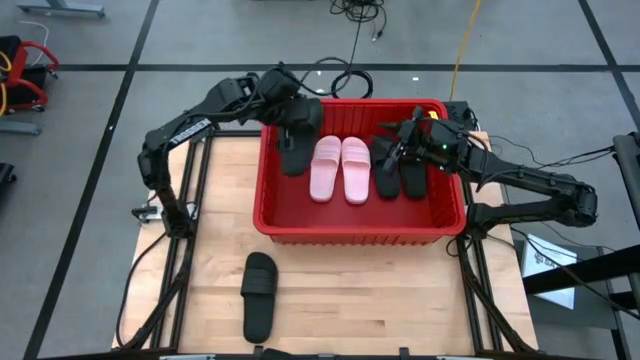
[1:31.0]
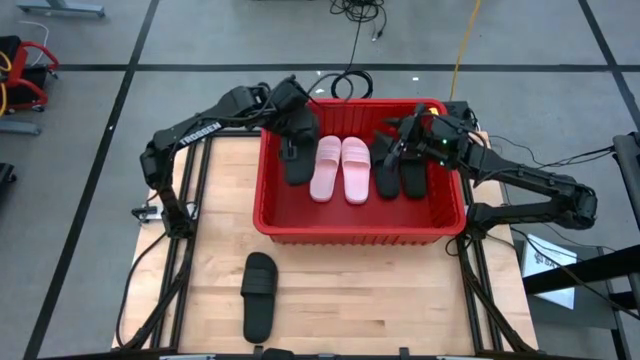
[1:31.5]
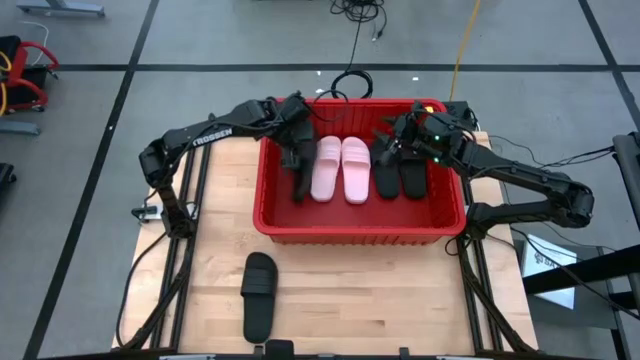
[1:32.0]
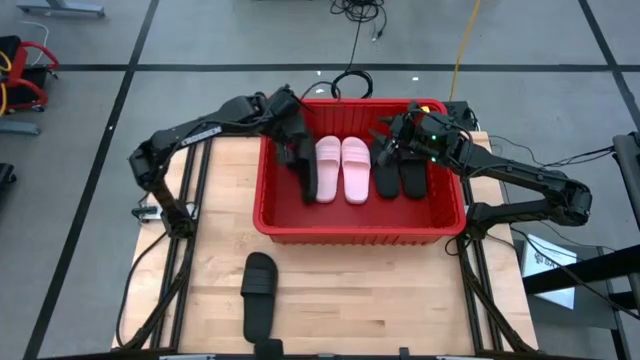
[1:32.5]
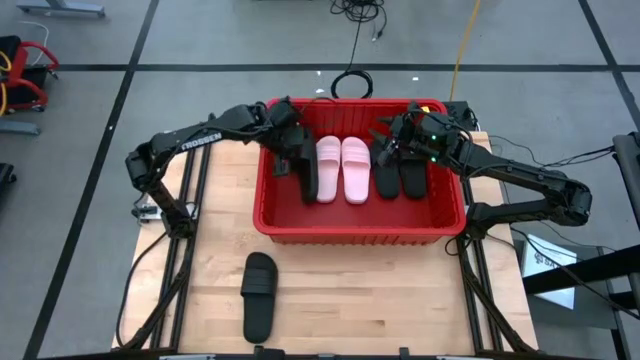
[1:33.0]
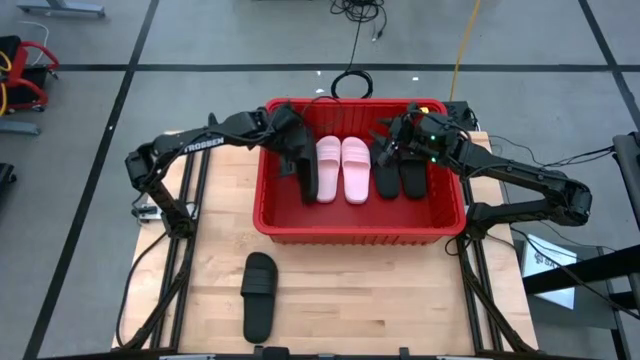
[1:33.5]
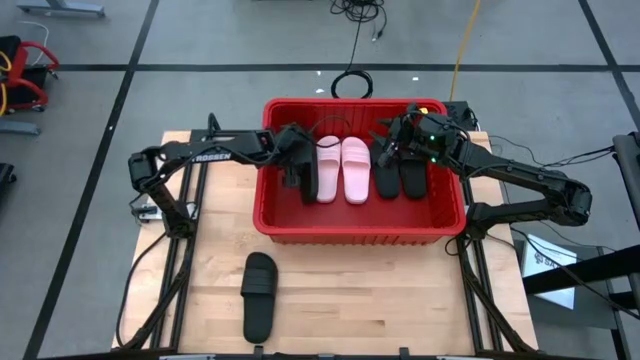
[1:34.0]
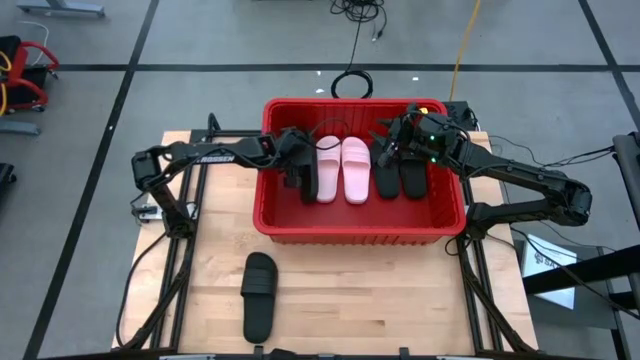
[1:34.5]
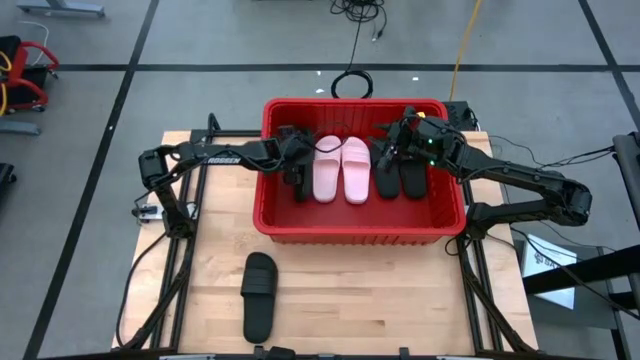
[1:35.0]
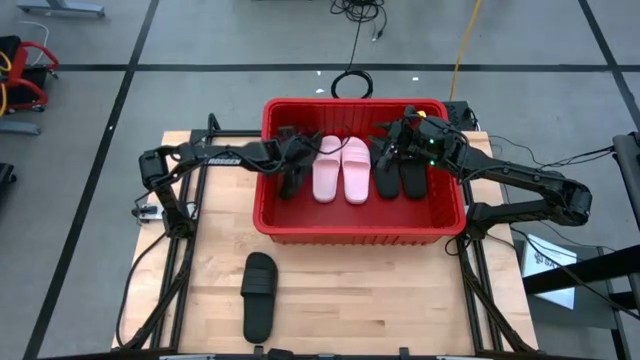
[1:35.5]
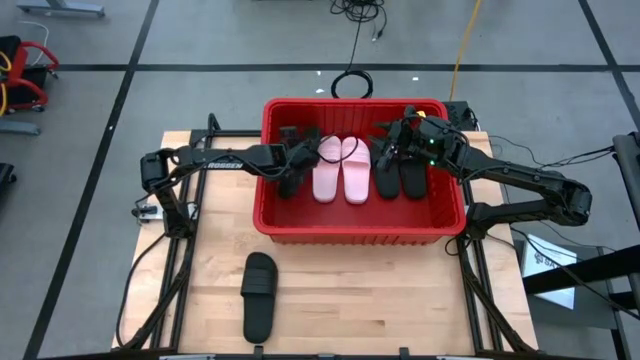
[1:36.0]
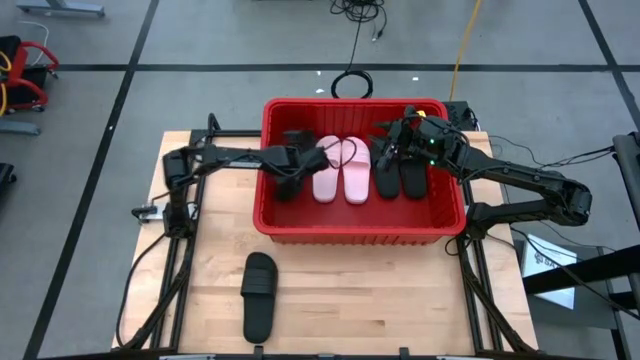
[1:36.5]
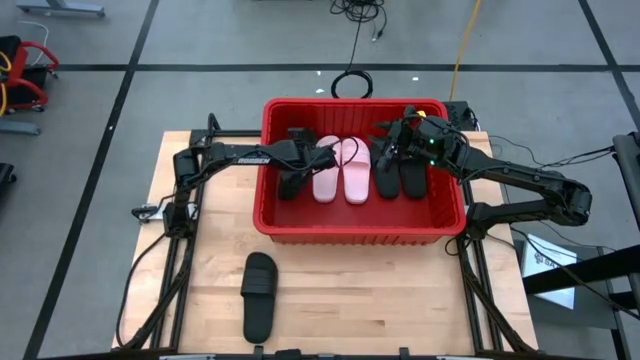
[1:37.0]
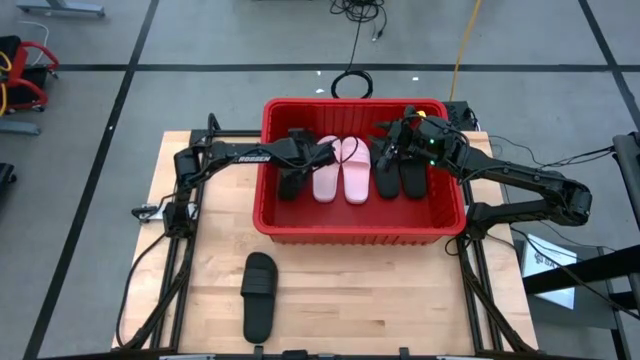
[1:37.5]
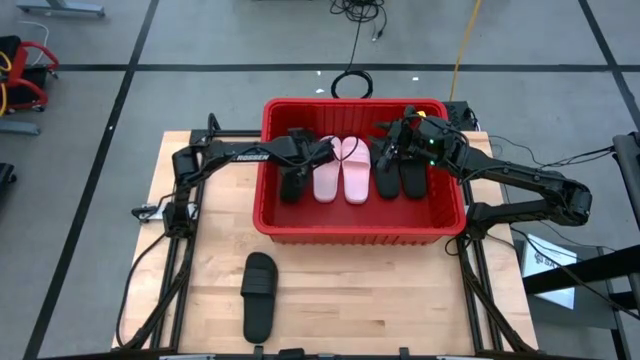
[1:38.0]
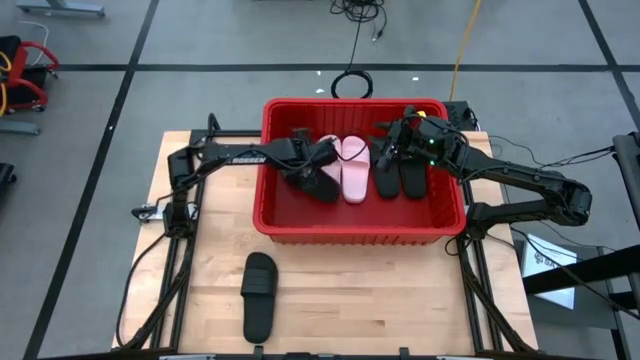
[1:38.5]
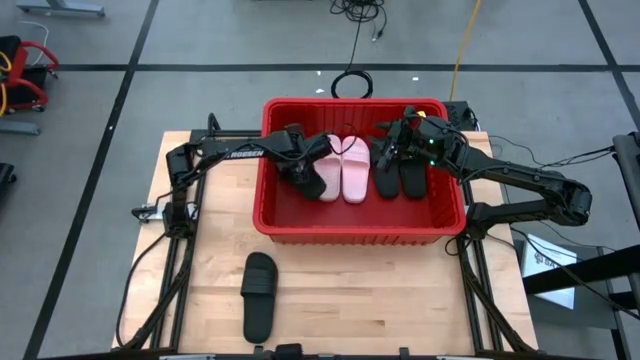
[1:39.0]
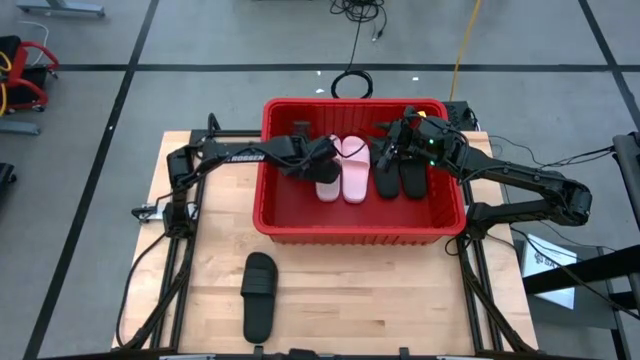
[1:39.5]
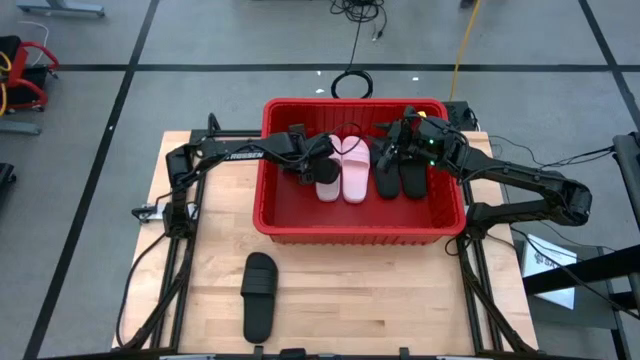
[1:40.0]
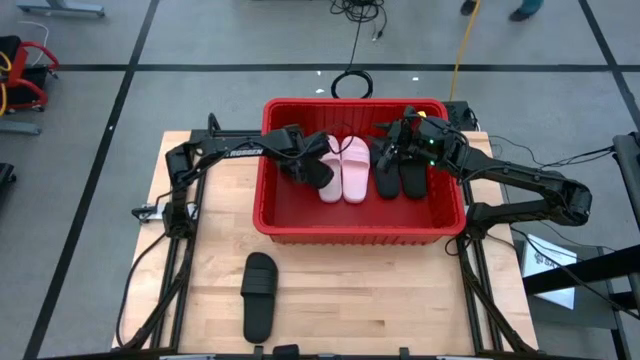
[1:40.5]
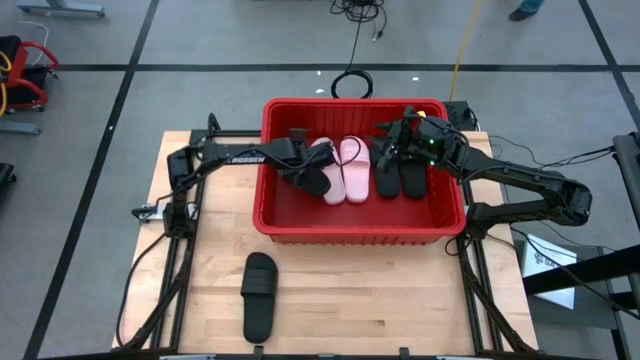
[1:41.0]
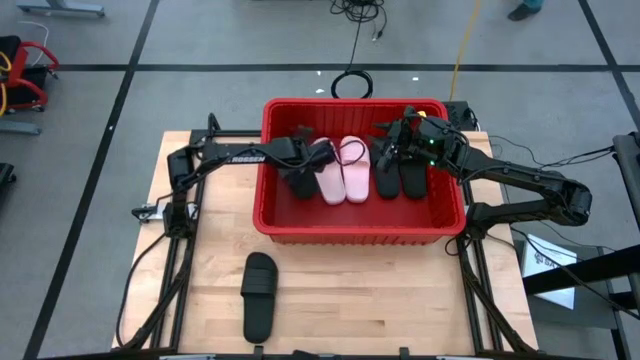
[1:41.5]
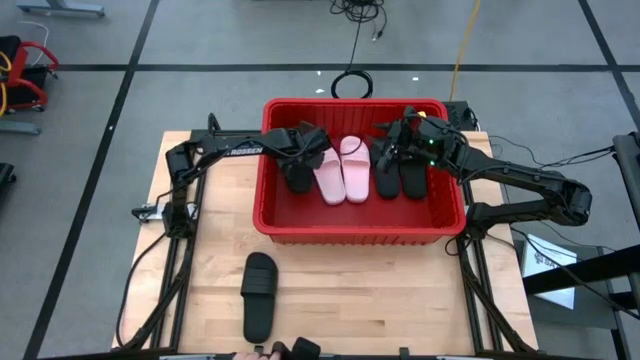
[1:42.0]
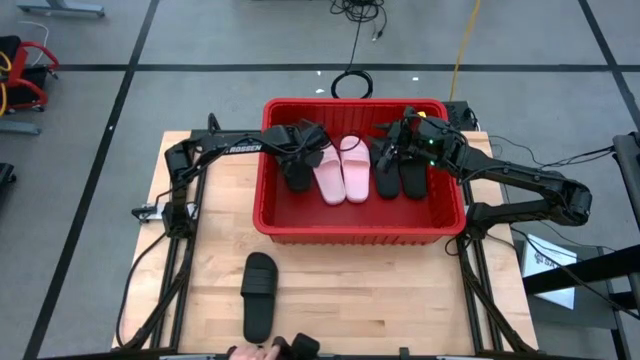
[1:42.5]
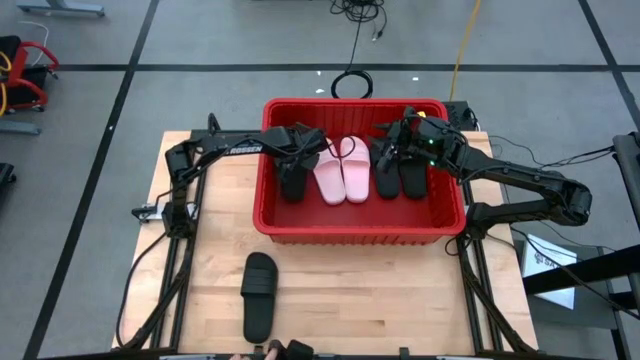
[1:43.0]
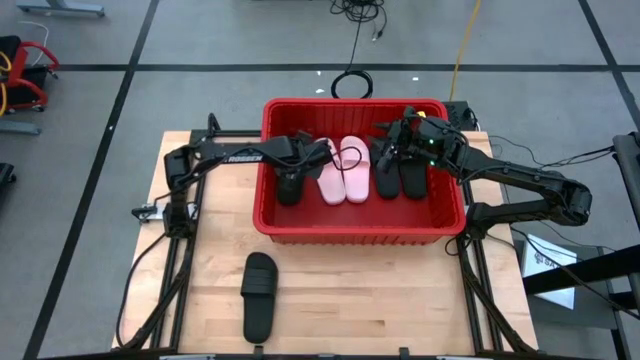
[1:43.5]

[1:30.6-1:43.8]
Task: Pick and place slides into bin
Put the black slide into the red bin

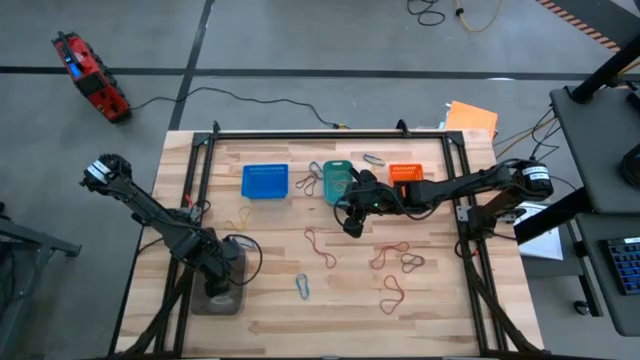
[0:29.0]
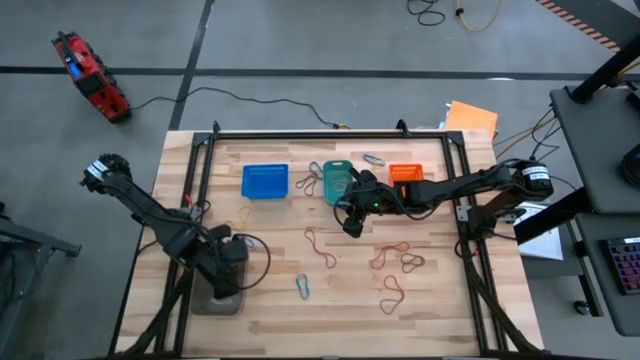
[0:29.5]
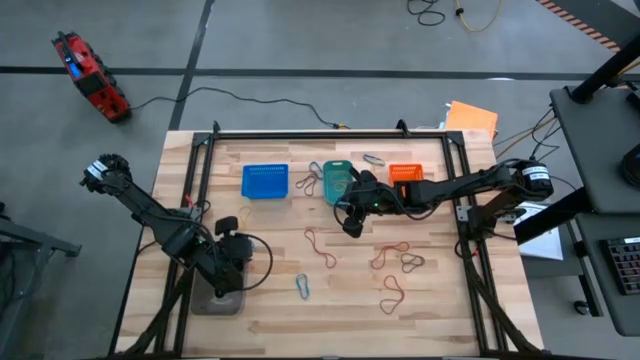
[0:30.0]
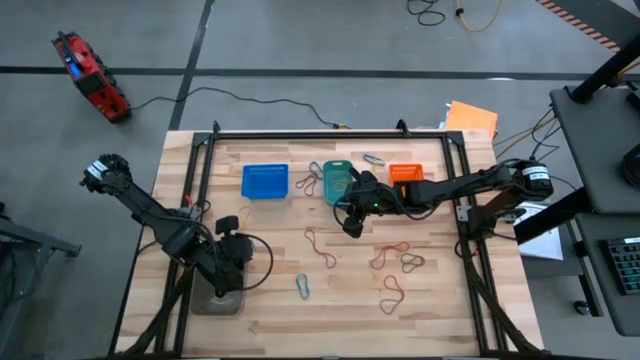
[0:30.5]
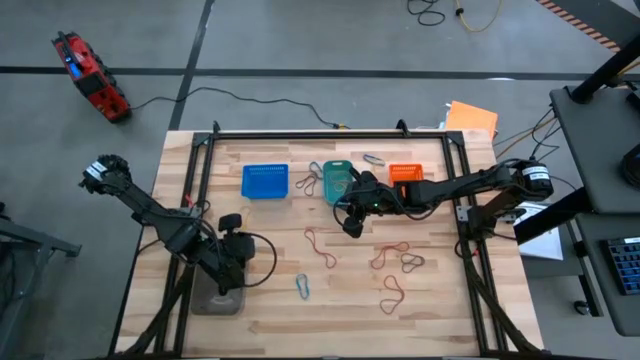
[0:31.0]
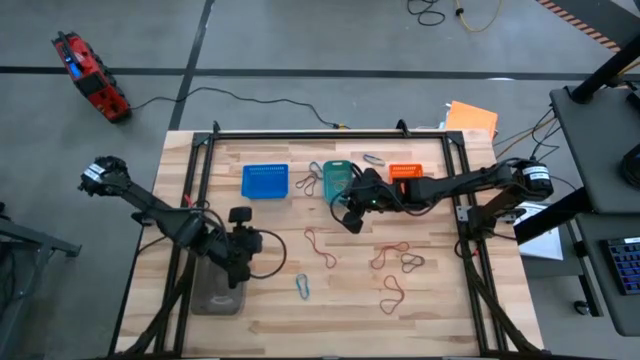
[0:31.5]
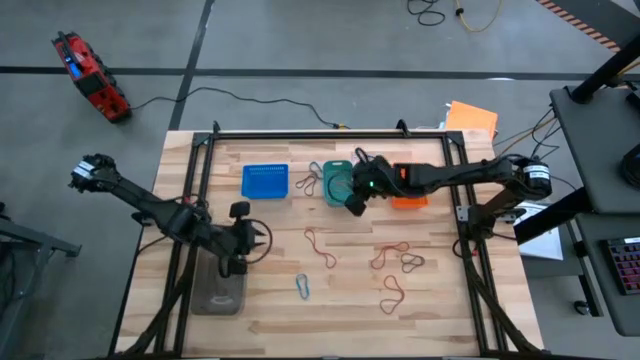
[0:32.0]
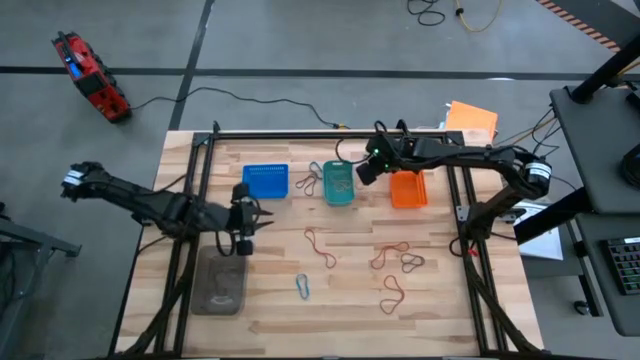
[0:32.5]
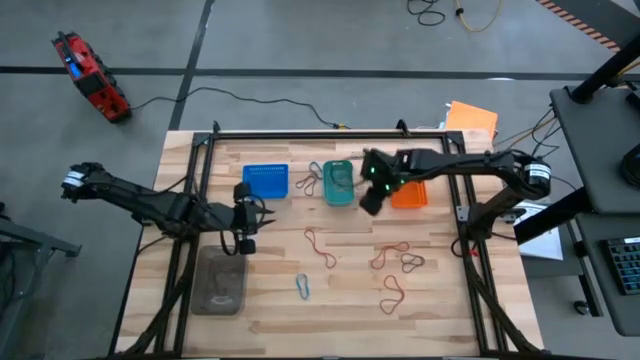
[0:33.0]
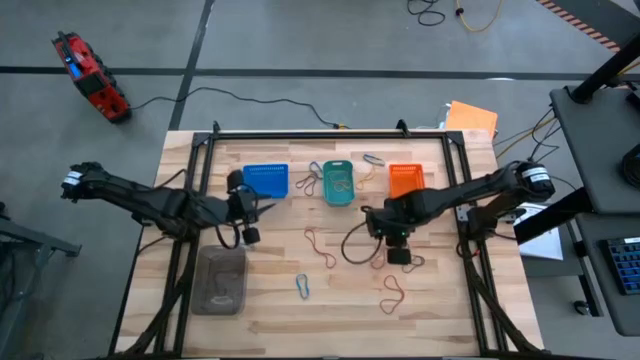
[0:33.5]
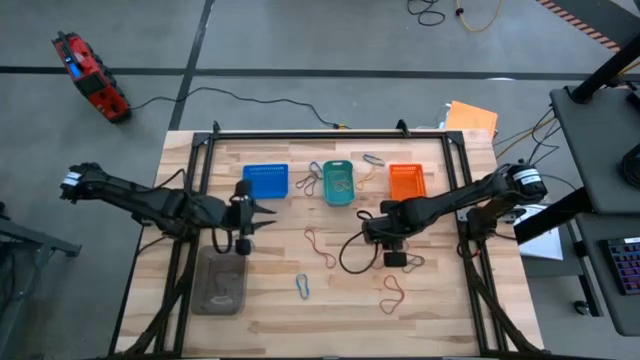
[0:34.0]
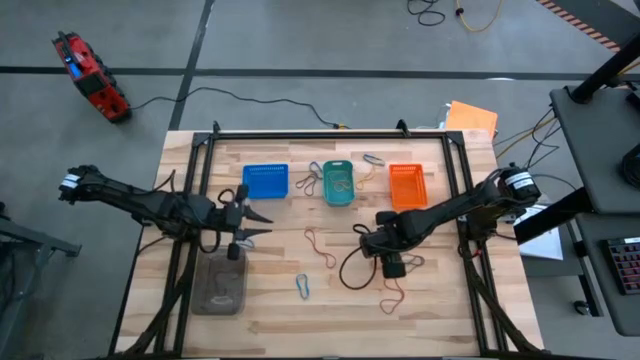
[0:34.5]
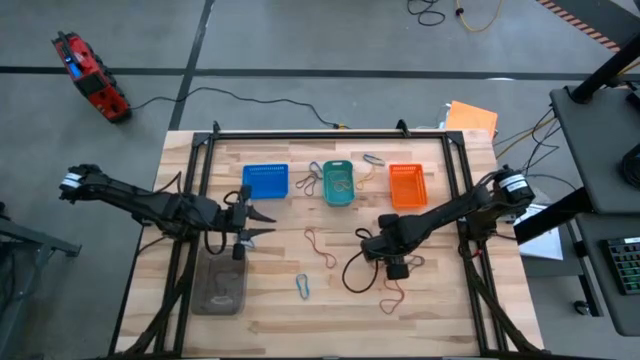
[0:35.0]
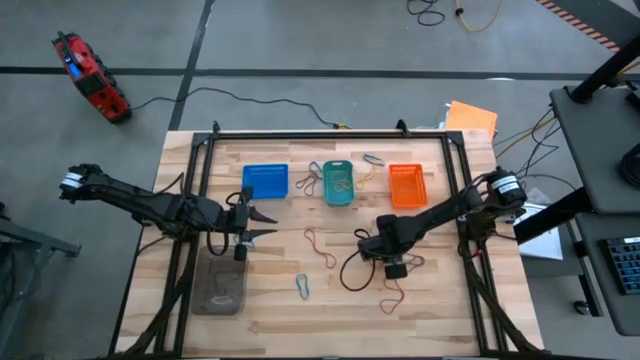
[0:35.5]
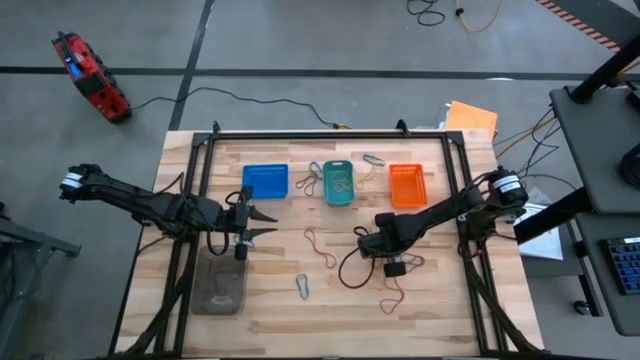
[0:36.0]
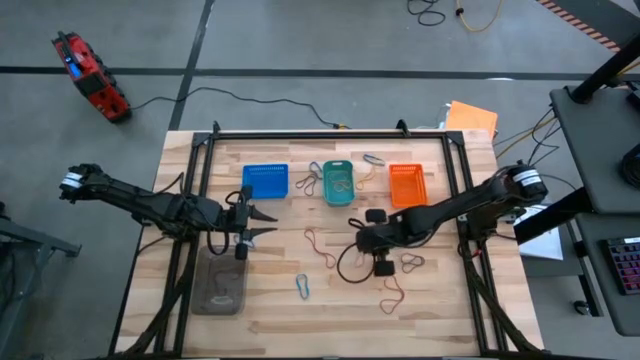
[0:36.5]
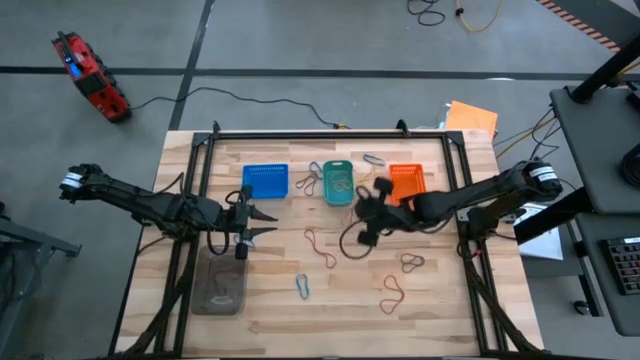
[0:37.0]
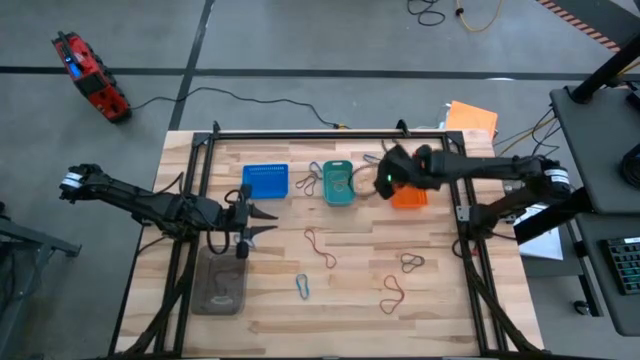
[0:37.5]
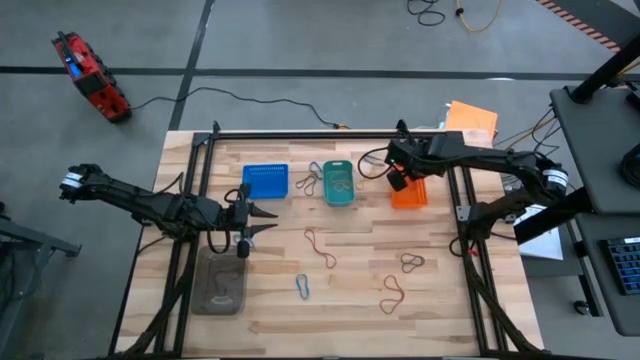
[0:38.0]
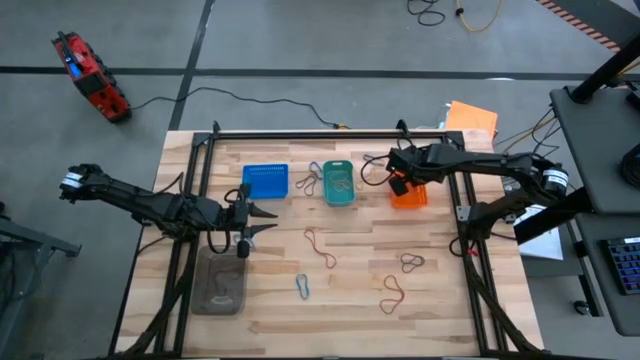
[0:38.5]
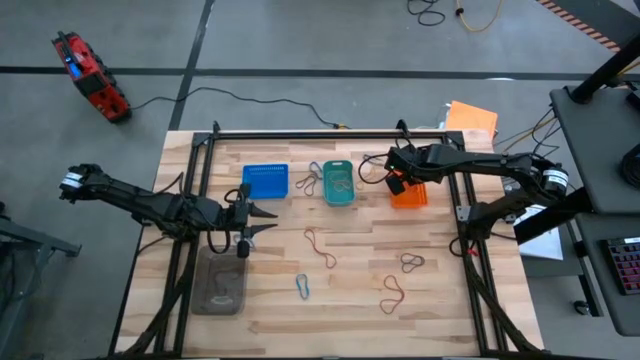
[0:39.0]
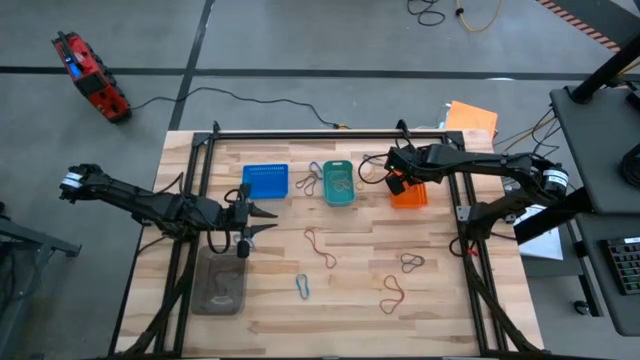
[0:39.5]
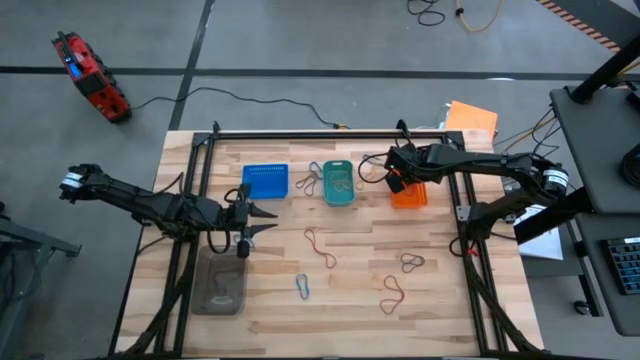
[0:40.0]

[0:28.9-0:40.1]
Task: Sort rubber bands into baskets
Put the top right red rubber band into the orange bin
